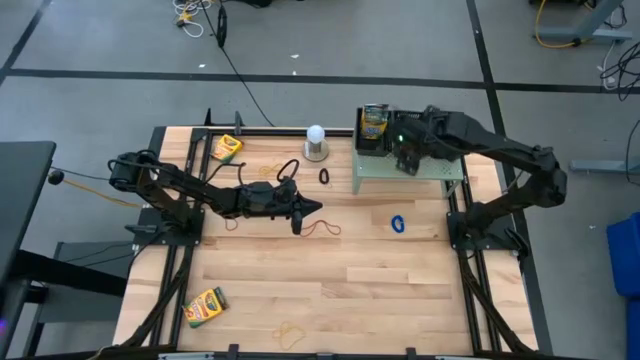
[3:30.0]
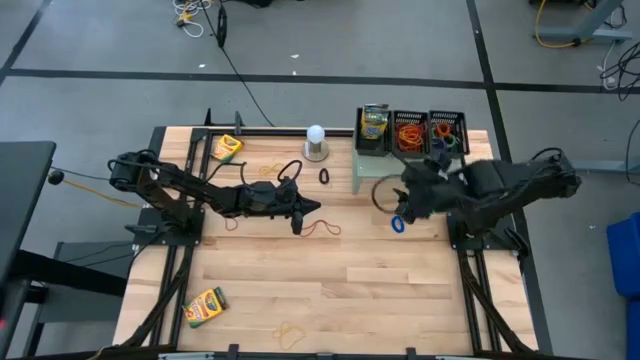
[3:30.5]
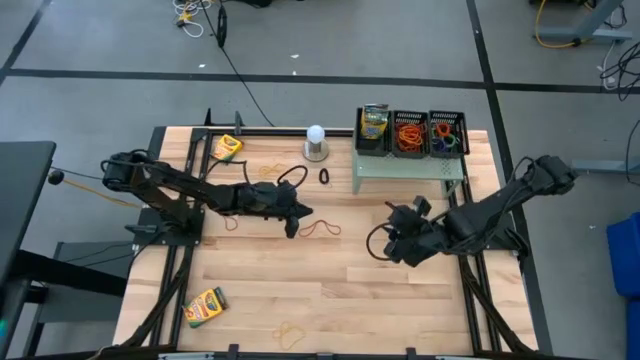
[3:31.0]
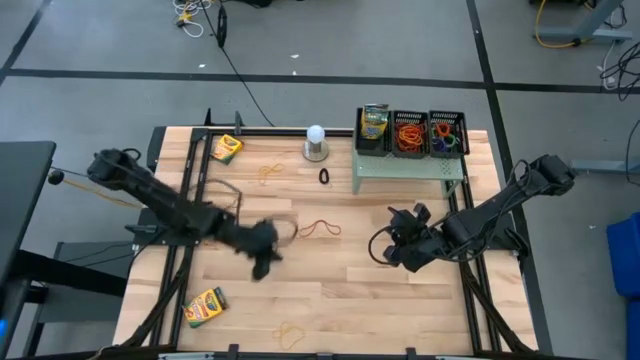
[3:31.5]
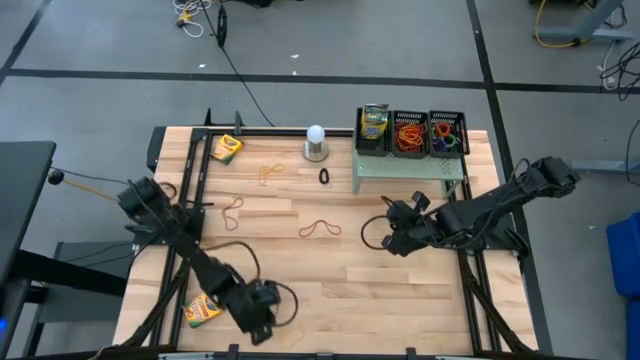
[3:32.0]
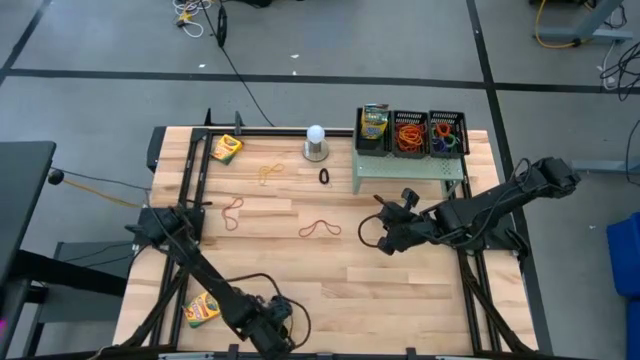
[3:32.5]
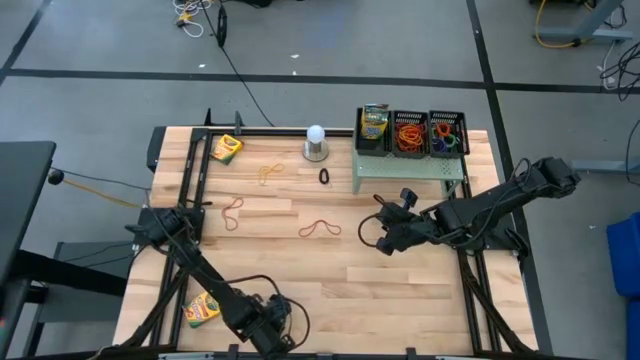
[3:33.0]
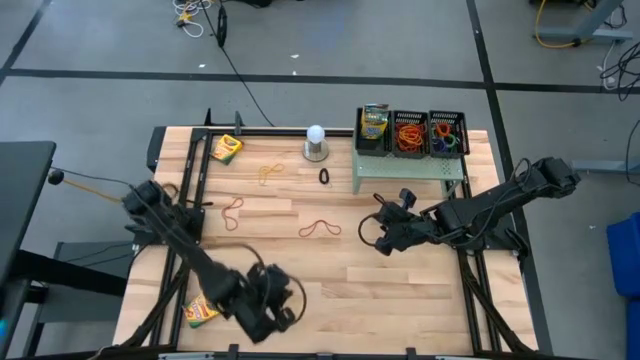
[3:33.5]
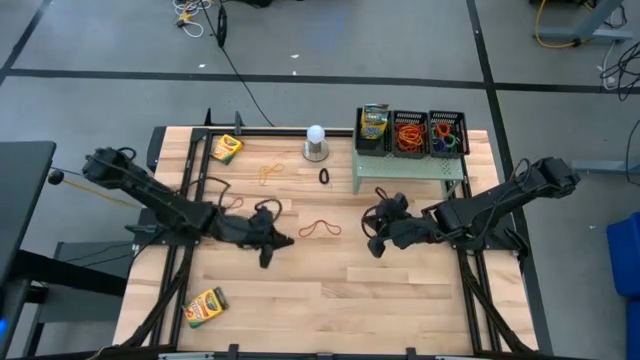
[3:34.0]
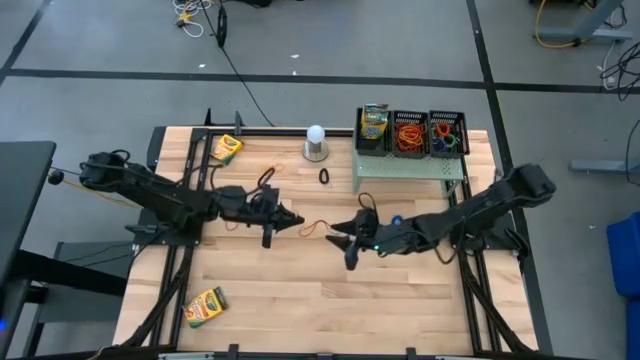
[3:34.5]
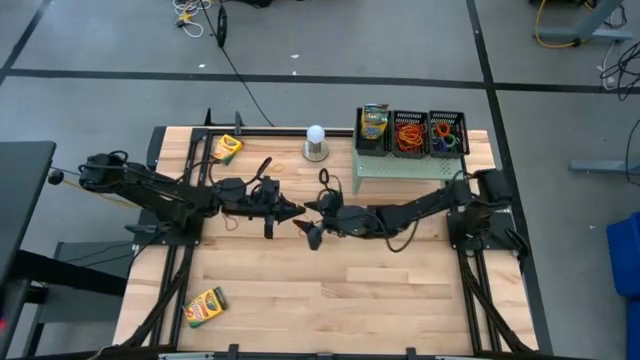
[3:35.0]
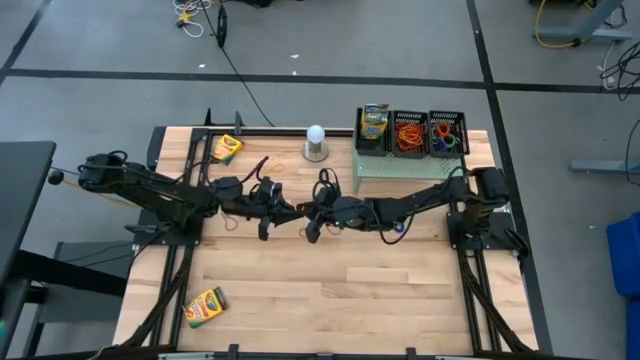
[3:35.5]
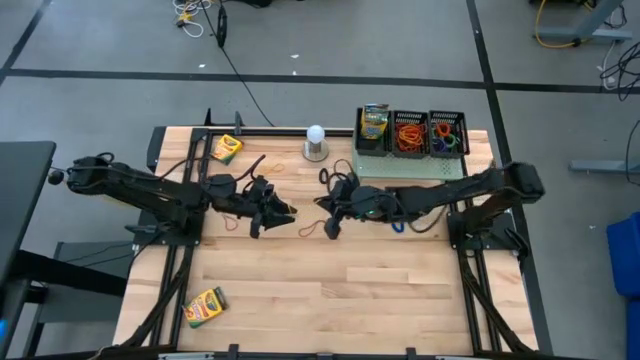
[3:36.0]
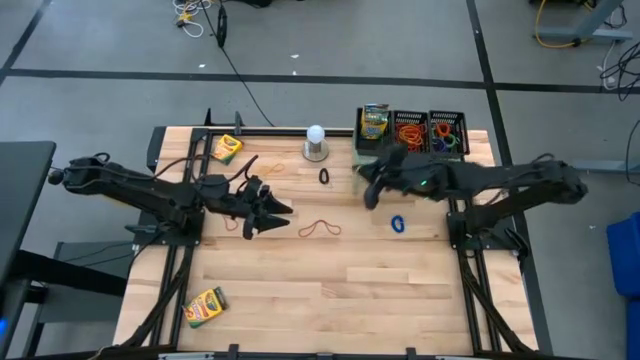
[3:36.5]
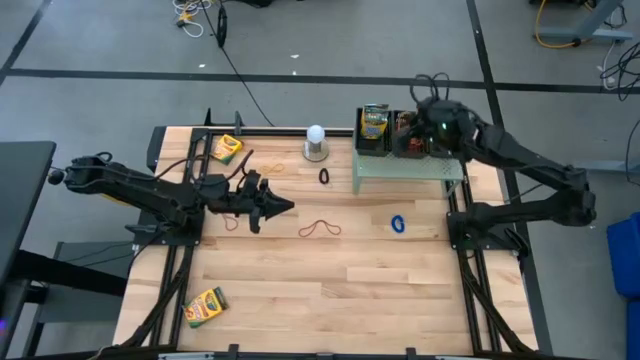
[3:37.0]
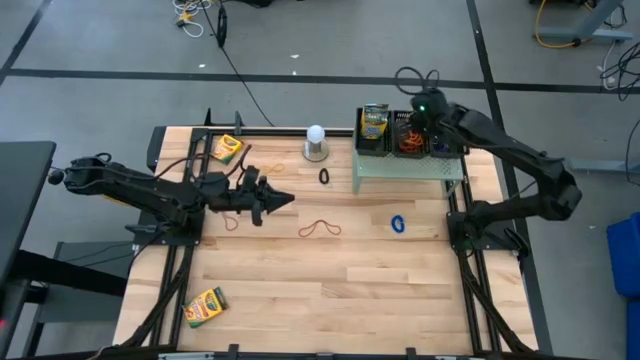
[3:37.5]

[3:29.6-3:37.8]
Task: Pick & Place Office Desk Supplies
Put the bottom yellow rubber band into the middle basket on the shelf

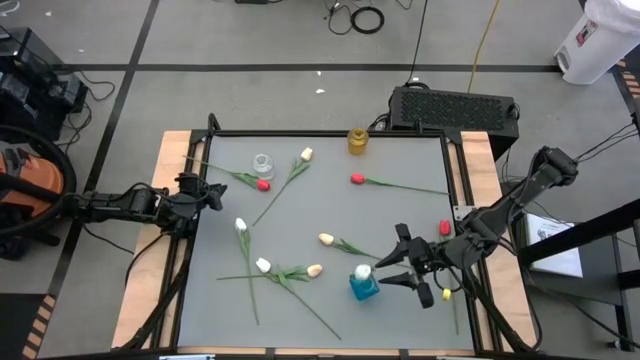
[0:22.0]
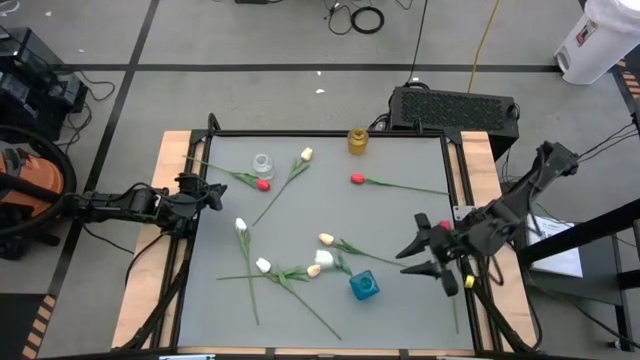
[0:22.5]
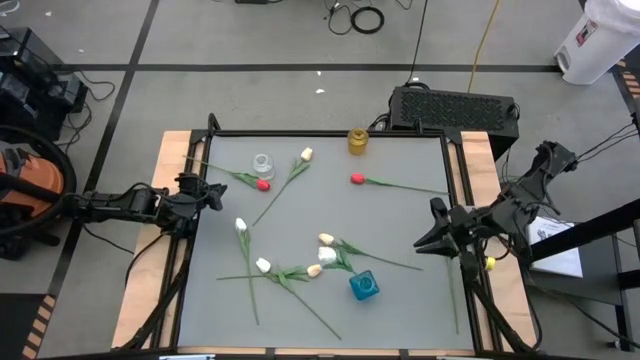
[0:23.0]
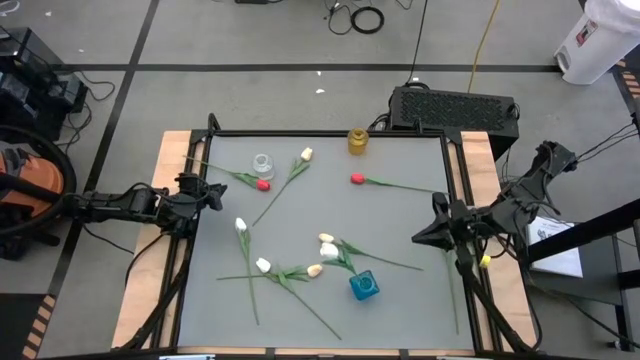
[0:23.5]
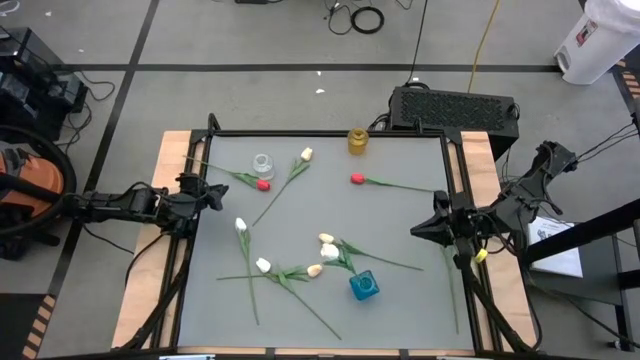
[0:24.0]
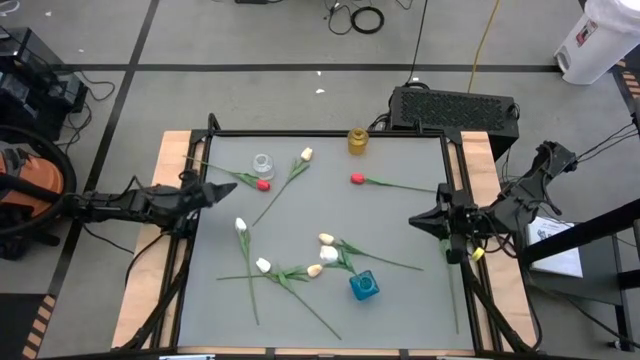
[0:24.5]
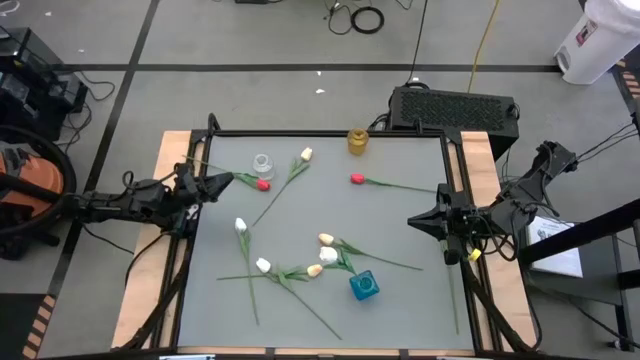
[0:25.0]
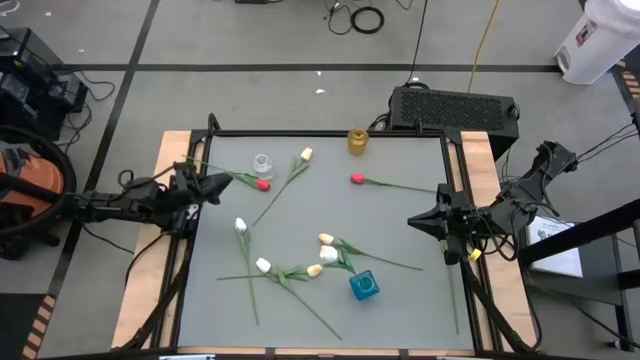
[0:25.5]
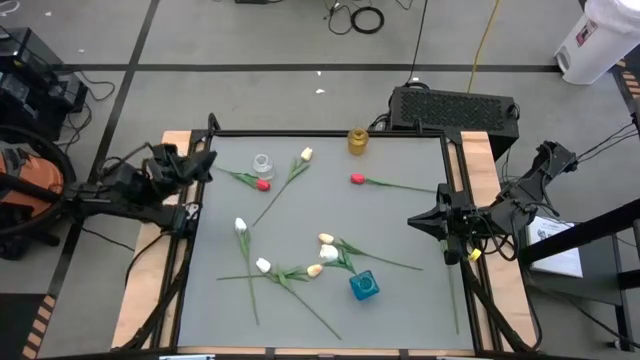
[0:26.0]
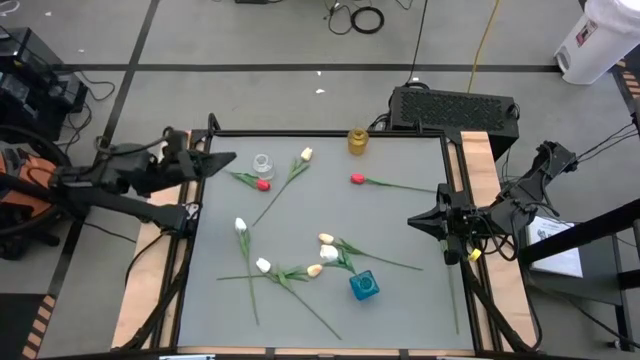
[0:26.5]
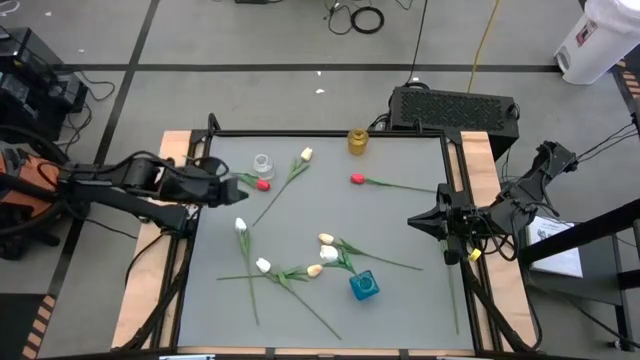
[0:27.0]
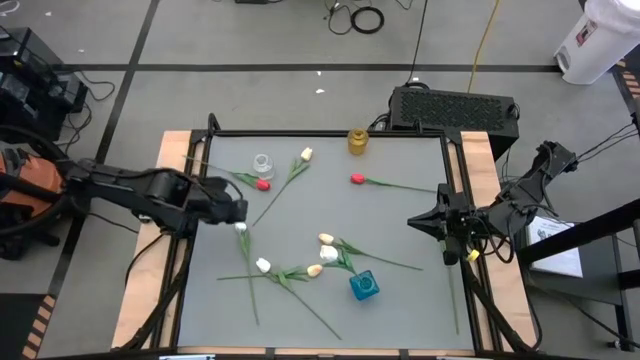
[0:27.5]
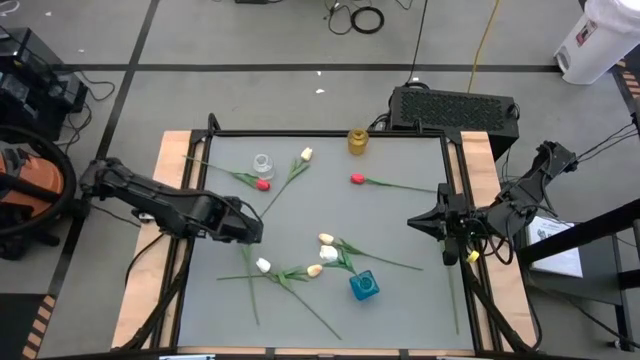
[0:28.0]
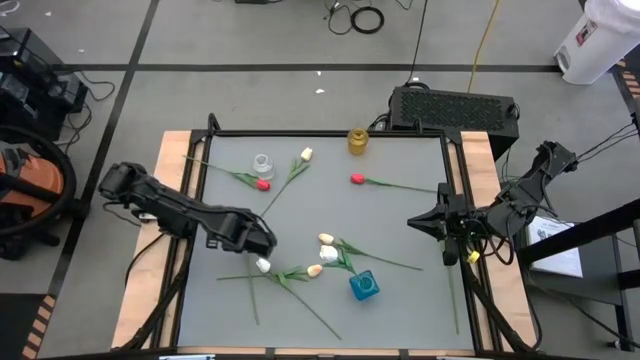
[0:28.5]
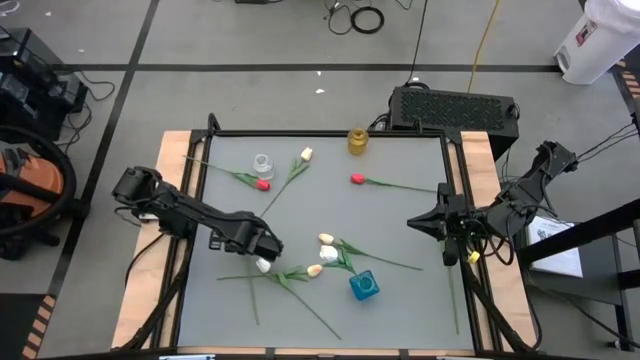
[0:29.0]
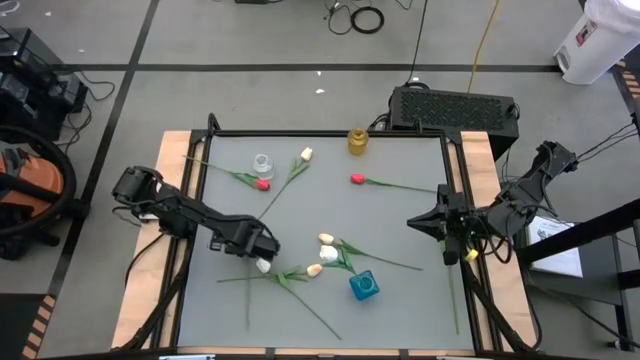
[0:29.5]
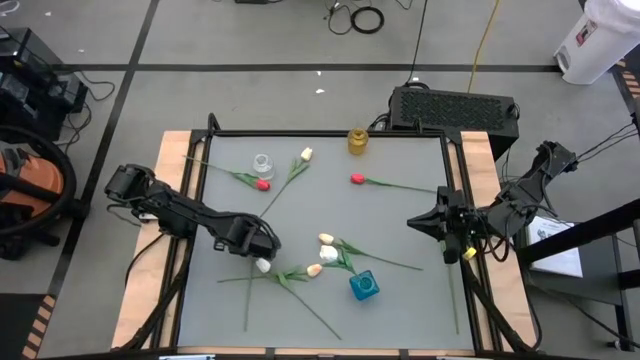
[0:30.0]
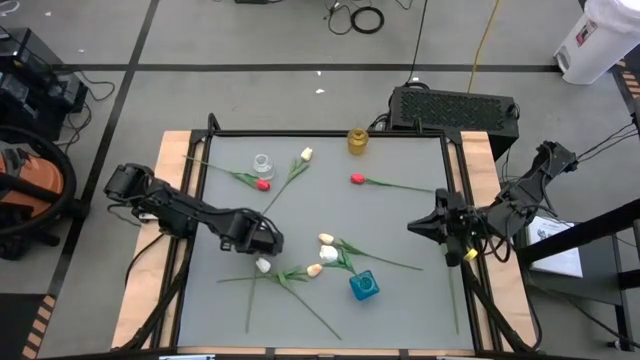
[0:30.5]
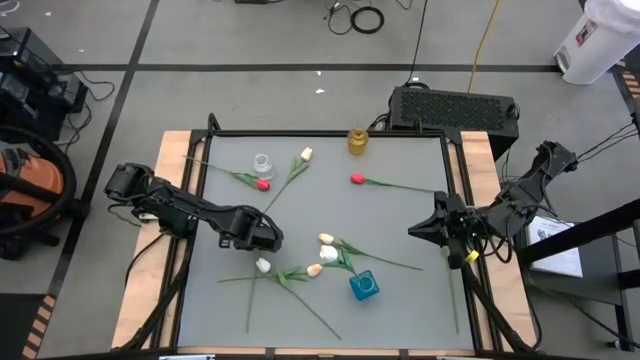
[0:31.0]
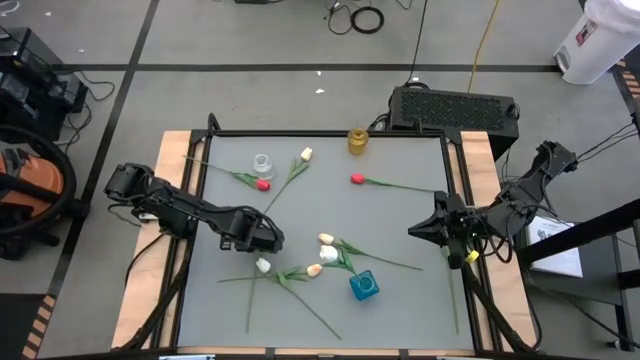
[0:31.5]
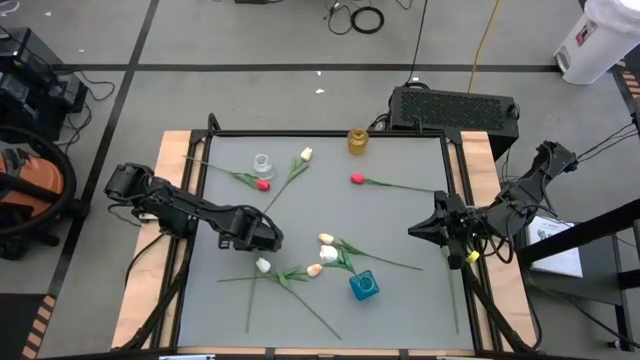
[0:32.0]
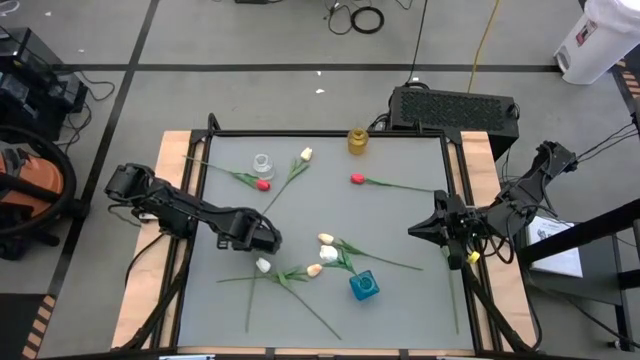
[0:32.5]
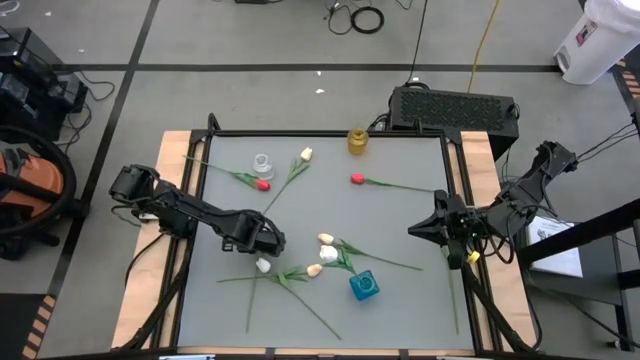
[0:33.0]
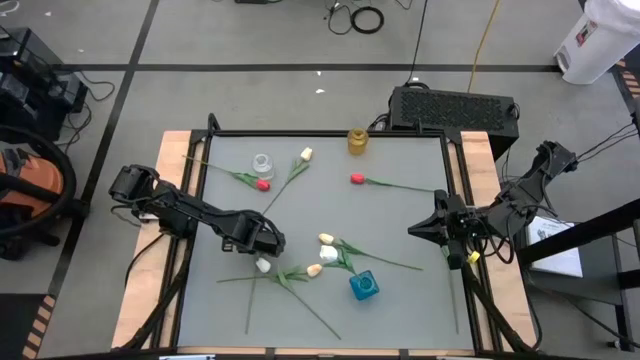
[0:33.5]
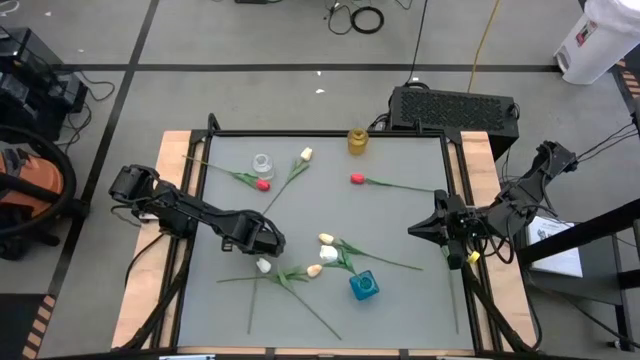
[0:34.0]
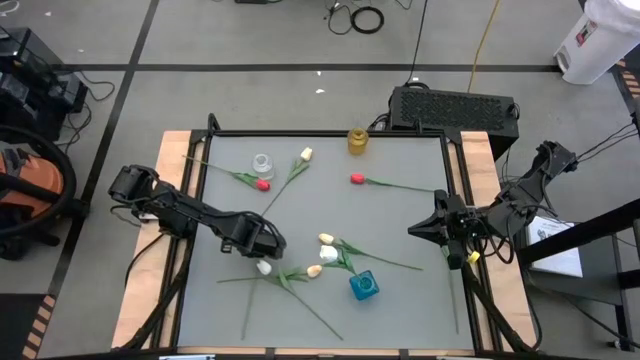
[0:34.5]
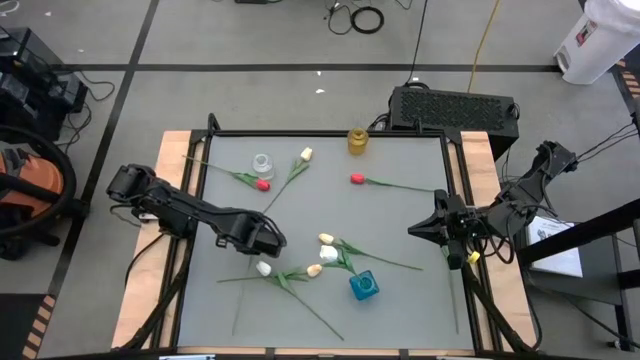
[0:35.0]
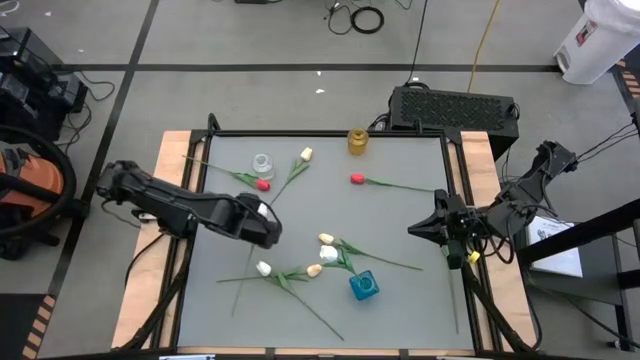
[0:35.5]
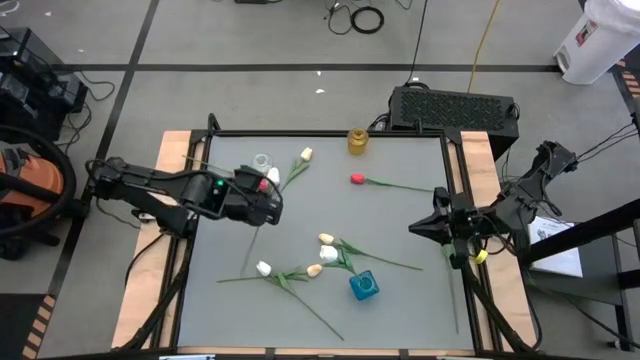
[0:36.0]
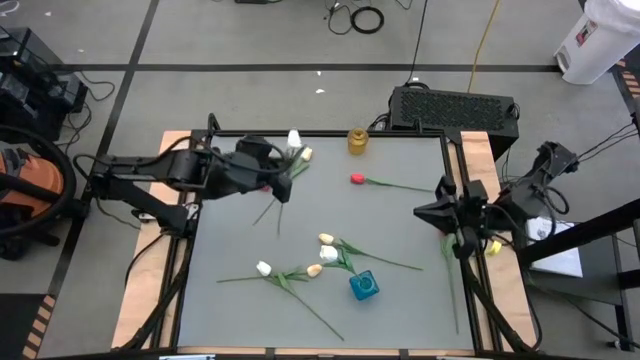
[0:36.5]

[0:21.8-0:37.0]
Task: Sort flowers into vase by color
Put the top white tulip into the blue vase
